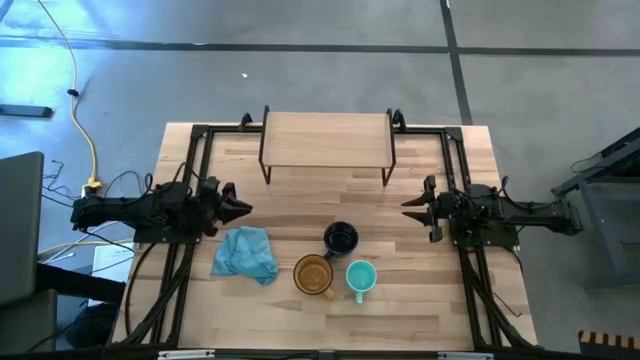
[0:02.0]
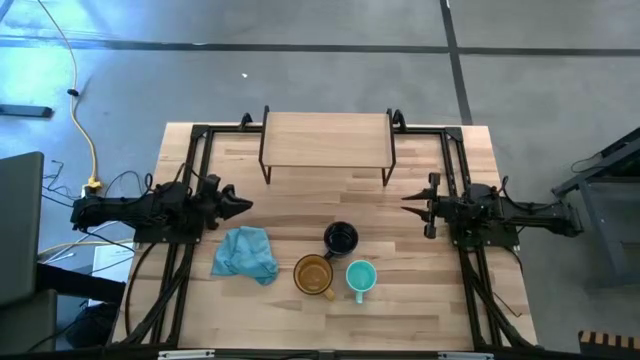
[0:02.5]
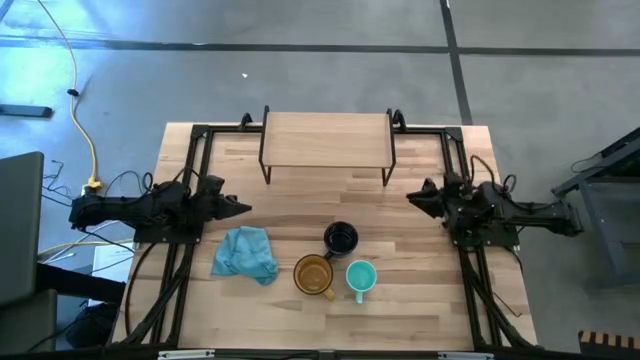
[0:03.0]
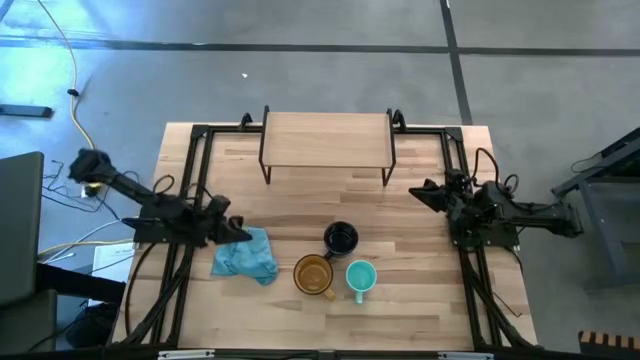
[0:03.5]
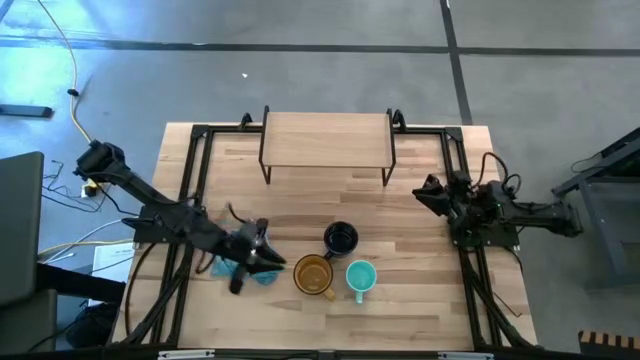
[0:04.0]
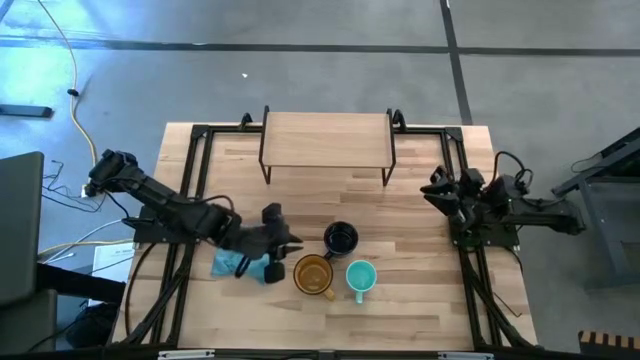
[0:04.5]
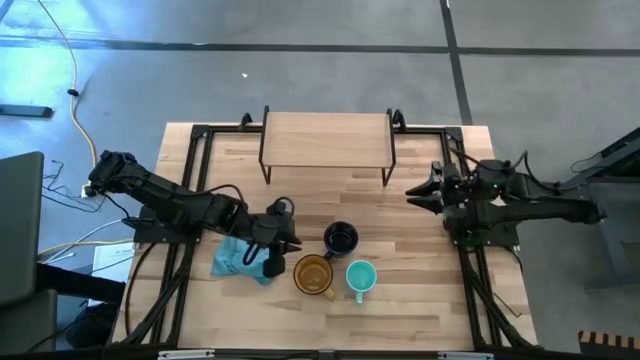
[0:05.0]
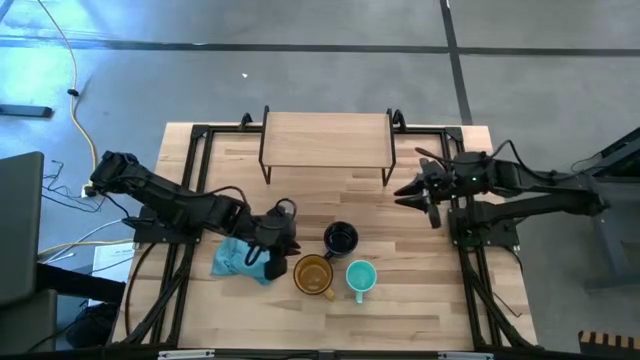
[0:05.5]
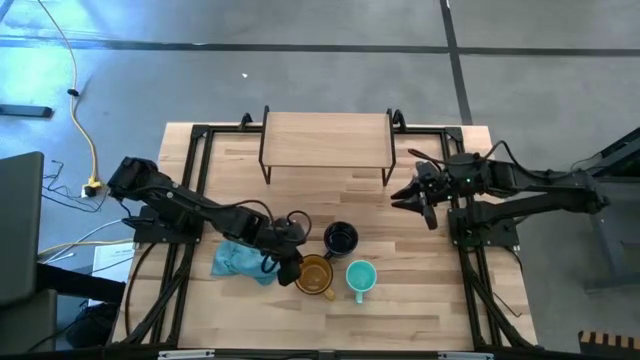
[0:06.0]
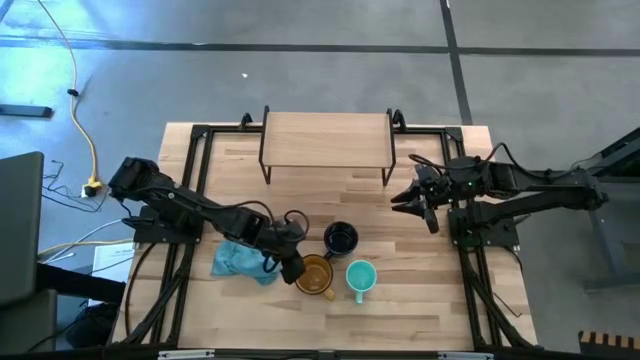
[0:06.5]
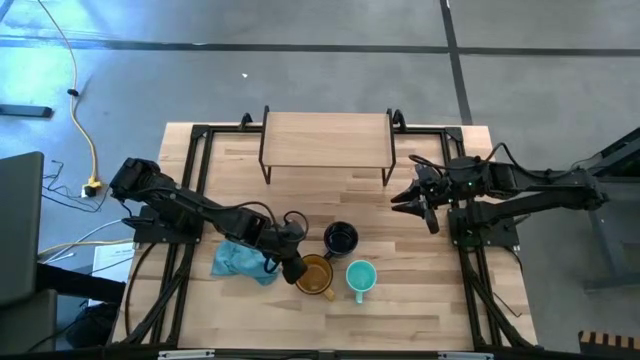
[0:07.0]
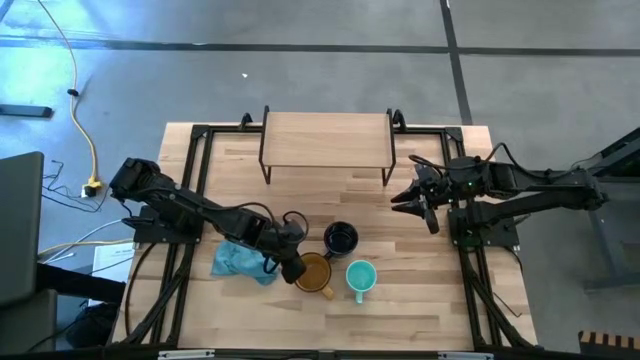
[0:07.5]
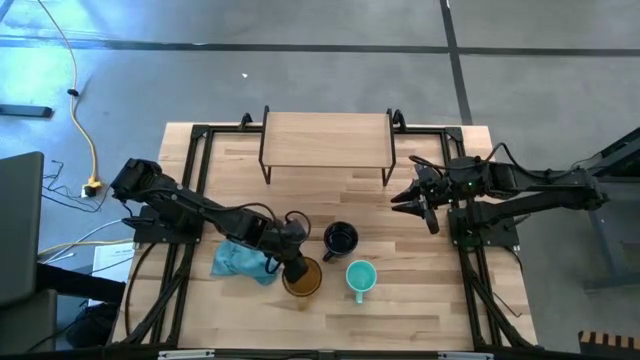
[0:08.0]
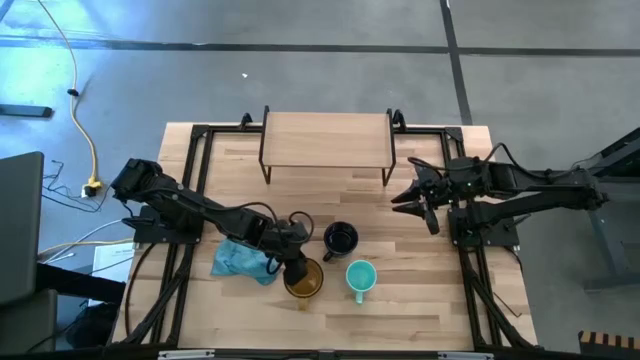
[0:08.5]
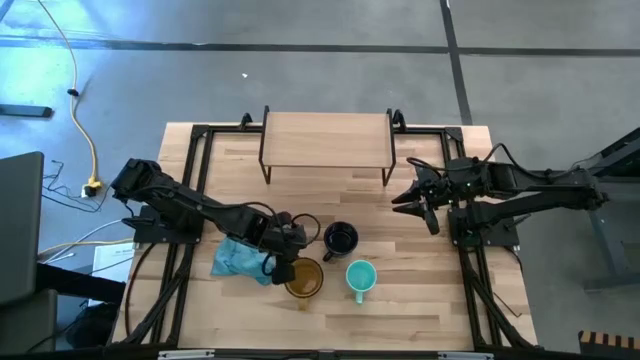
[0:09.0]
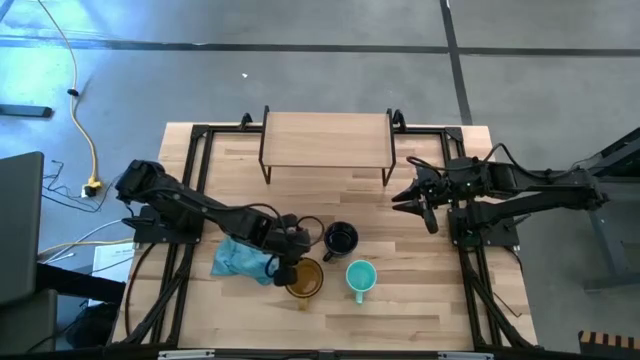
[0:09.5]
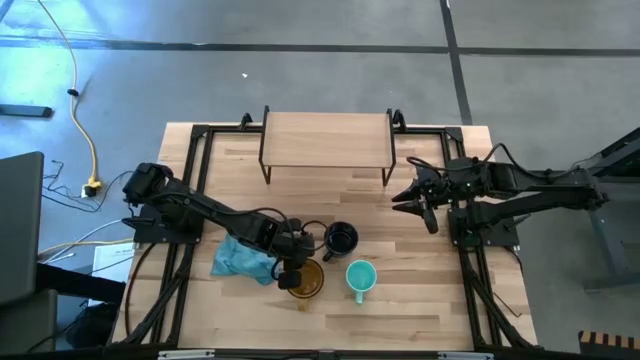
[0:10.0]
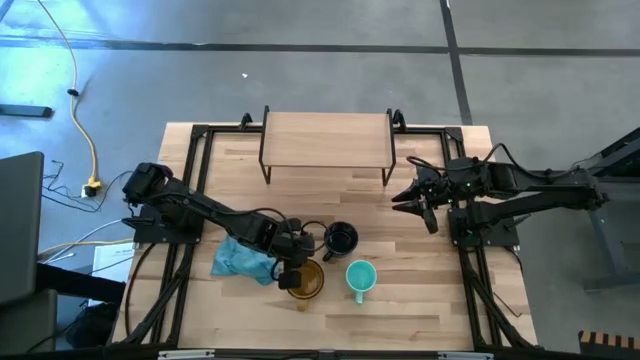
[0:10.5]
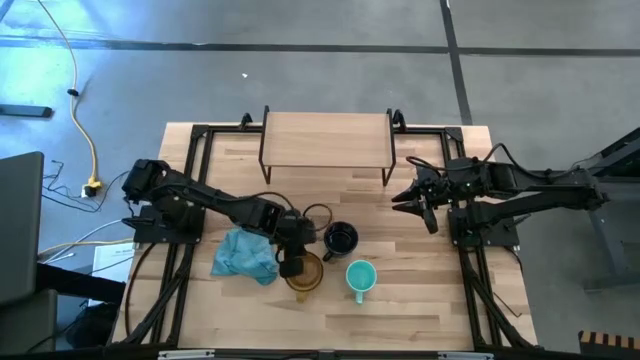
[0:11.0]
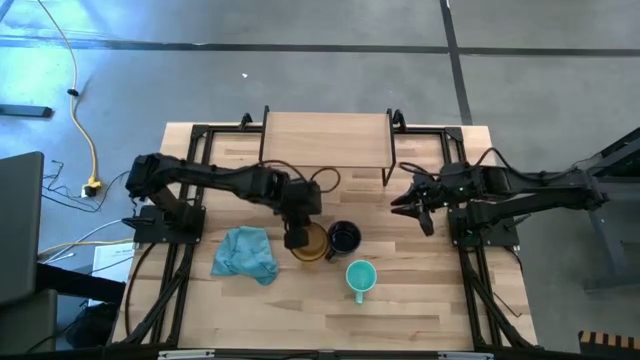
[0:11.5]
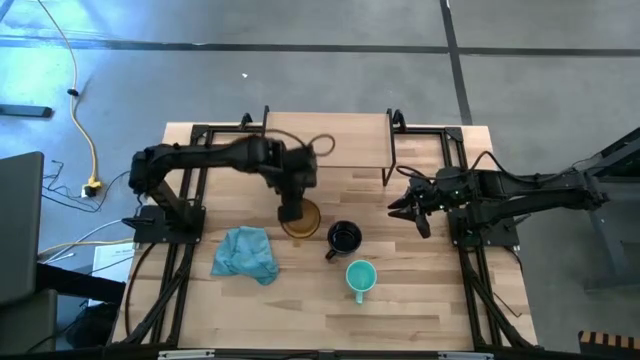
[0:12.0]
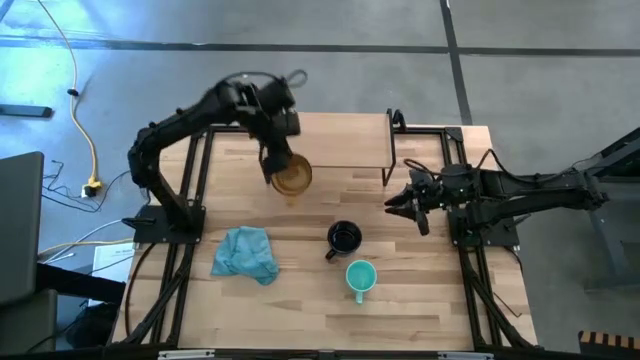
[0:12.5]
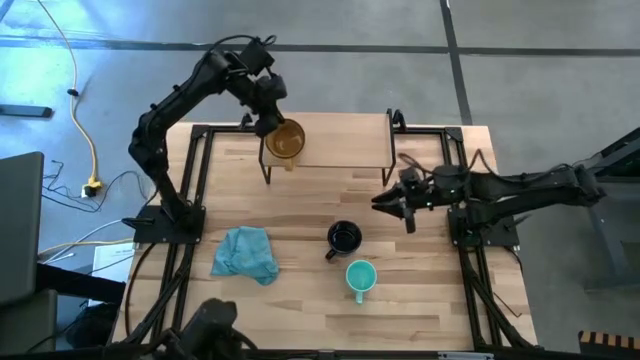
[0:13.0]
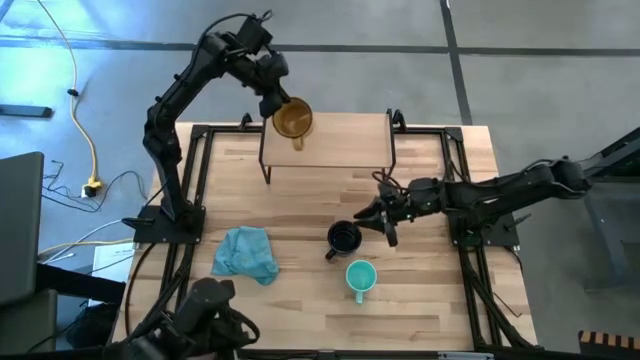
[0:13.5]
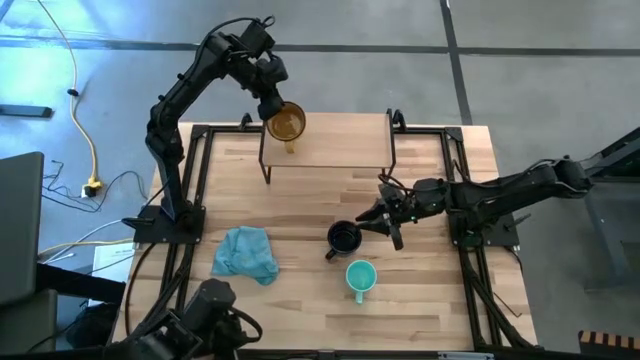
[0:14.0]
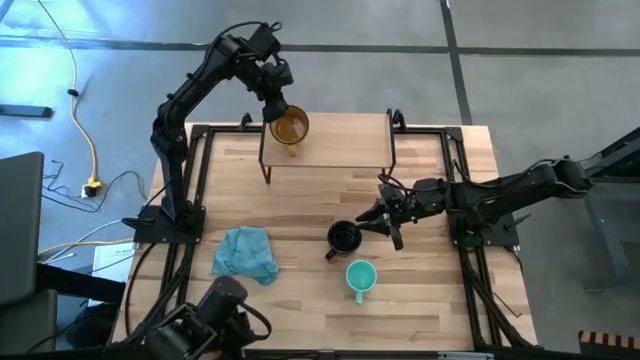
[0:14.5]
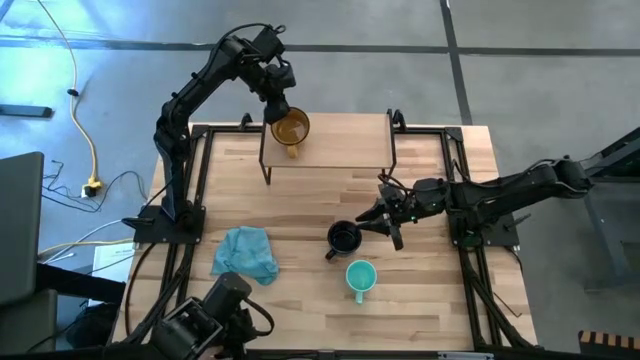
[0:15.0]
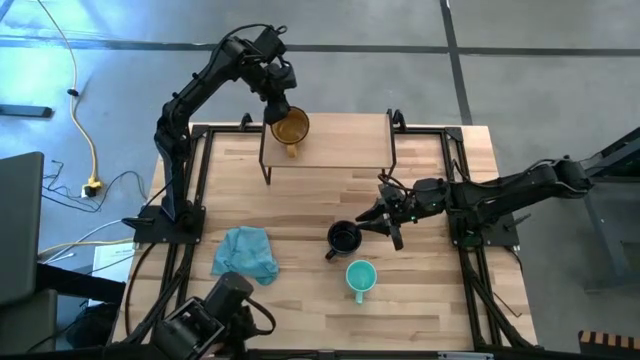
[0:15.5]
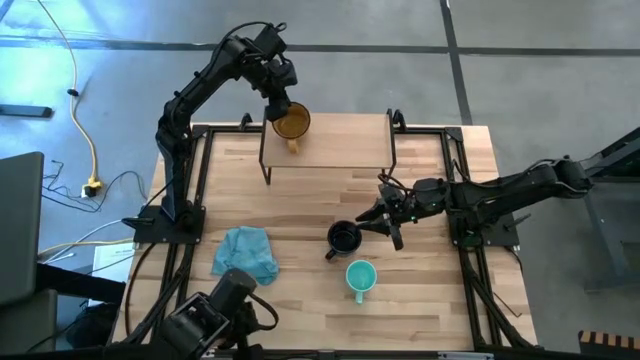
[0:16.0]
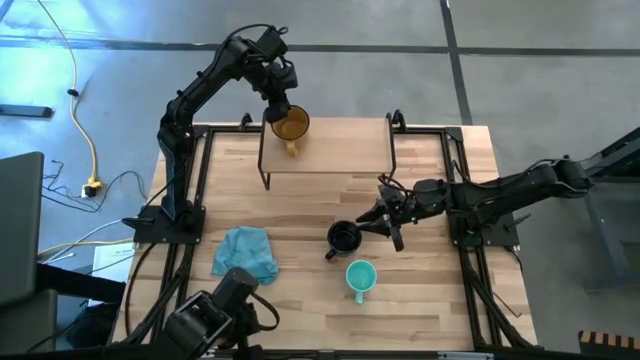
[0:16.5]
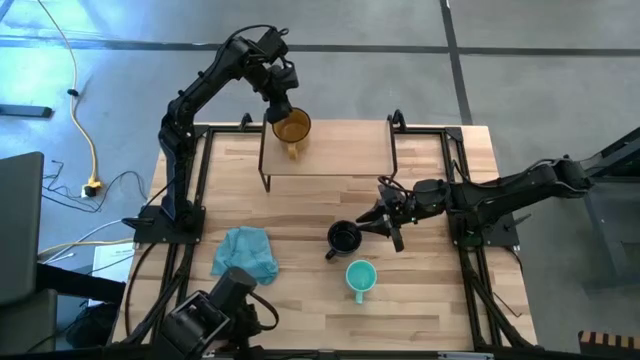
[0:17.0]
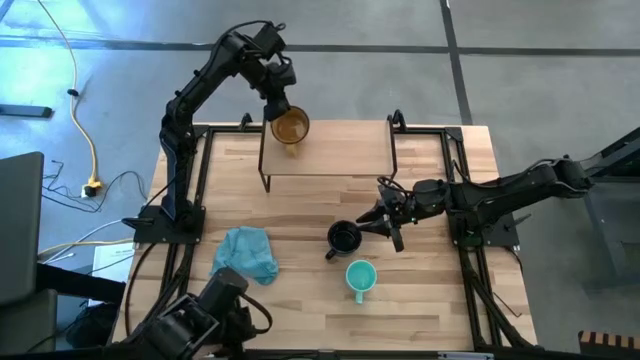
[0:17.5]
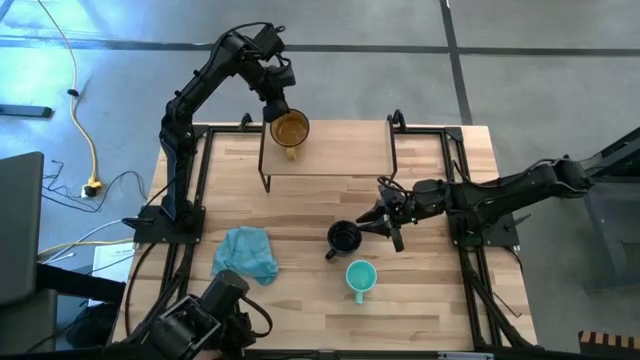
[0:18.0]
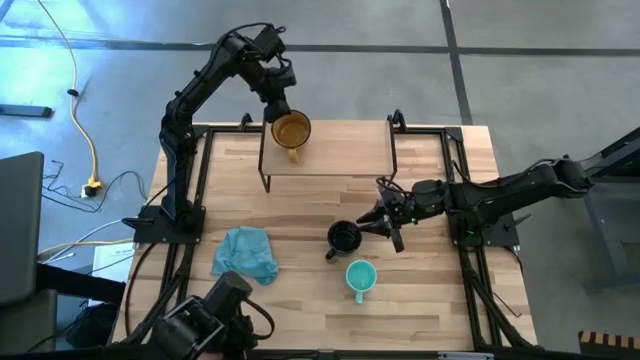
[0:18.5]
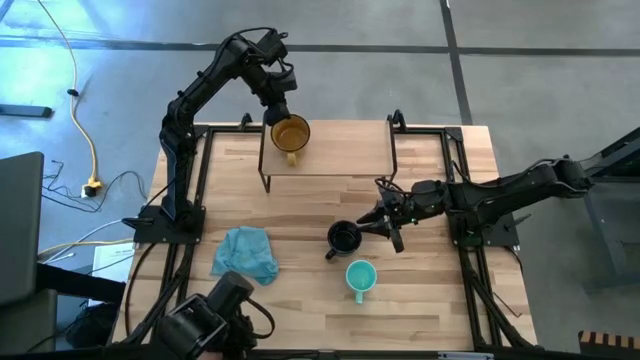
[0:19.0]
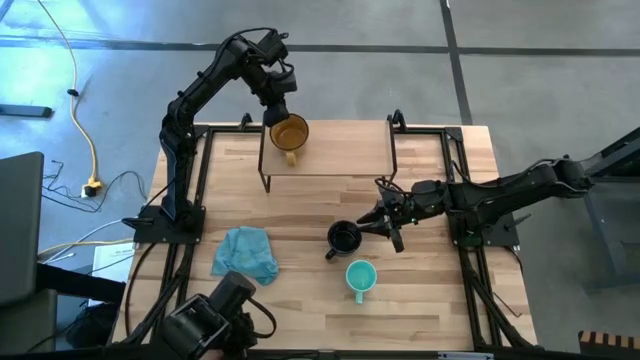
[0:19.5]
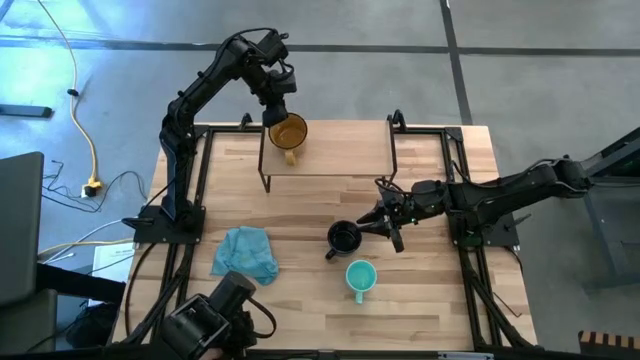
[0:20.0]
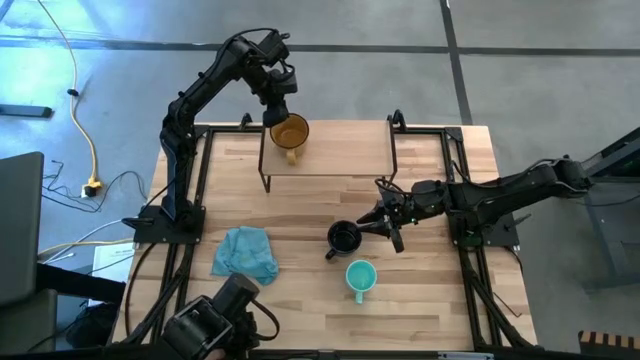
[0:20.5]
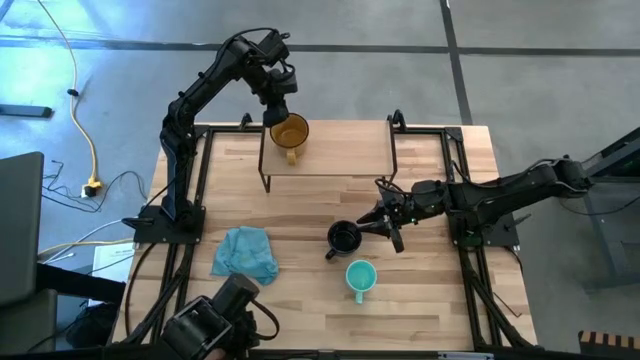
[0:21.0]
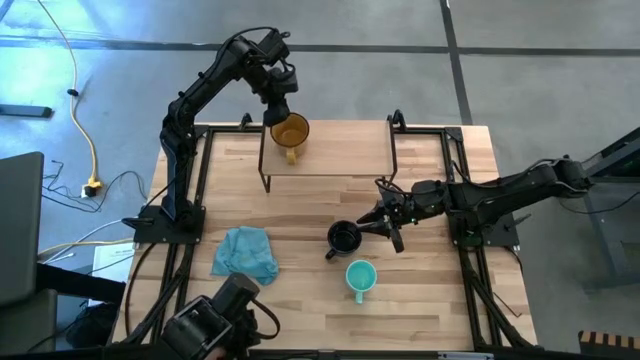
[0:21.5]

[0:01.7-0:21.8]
Task: Stack small to large cups/mugs on shelf
Put the yellow cup on the shelf
